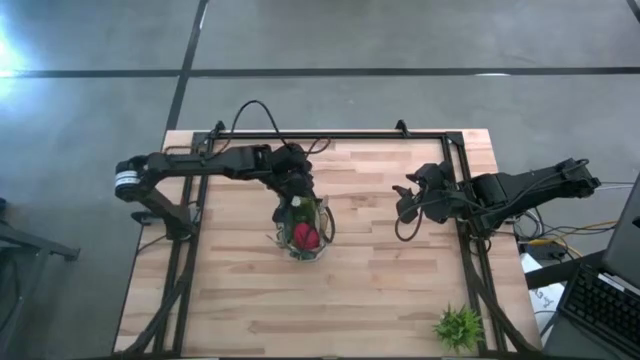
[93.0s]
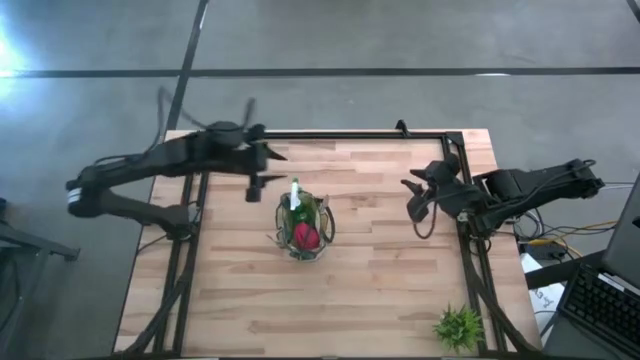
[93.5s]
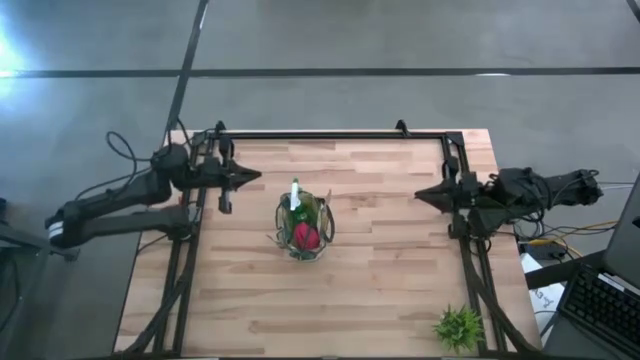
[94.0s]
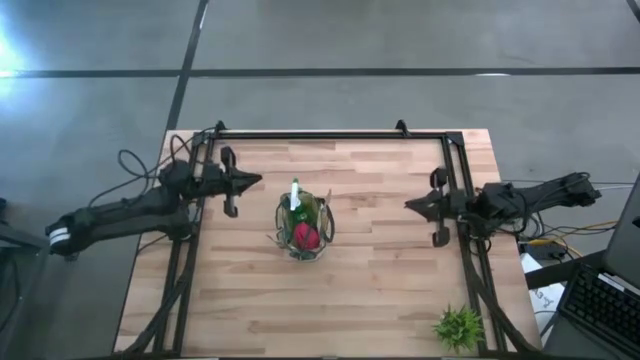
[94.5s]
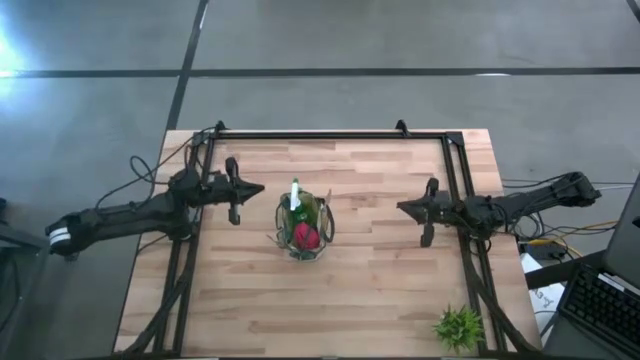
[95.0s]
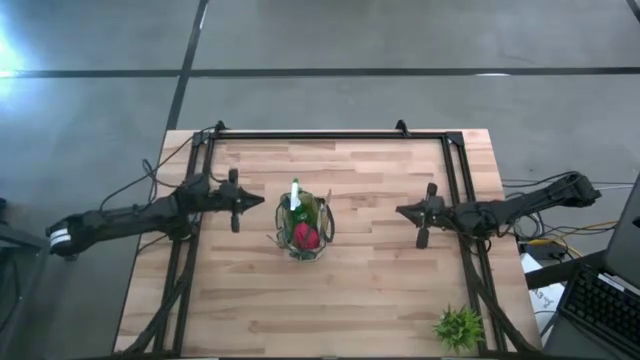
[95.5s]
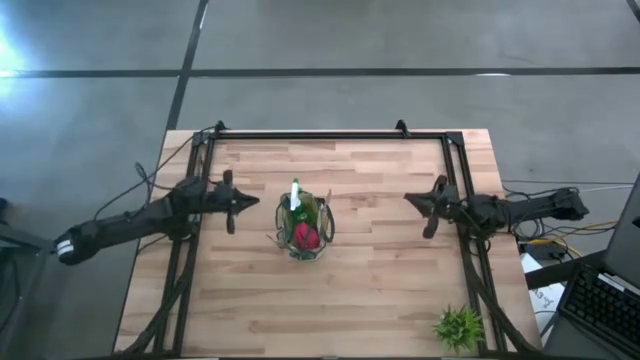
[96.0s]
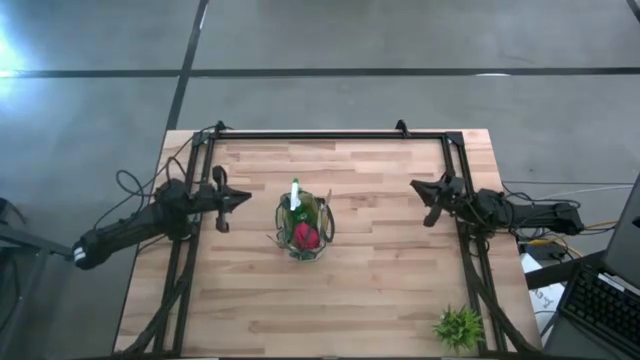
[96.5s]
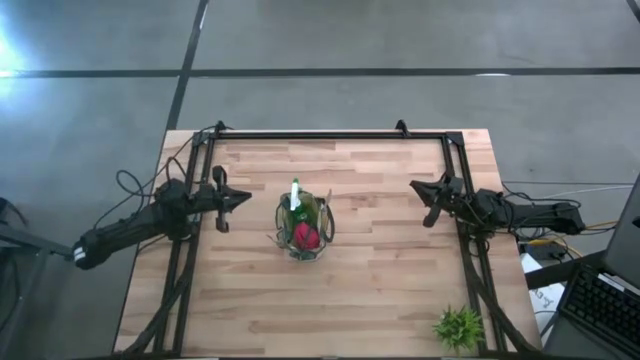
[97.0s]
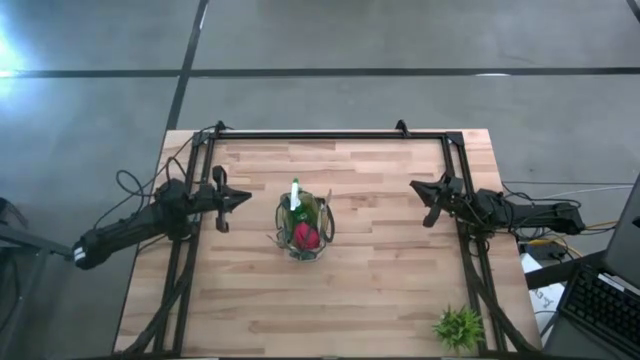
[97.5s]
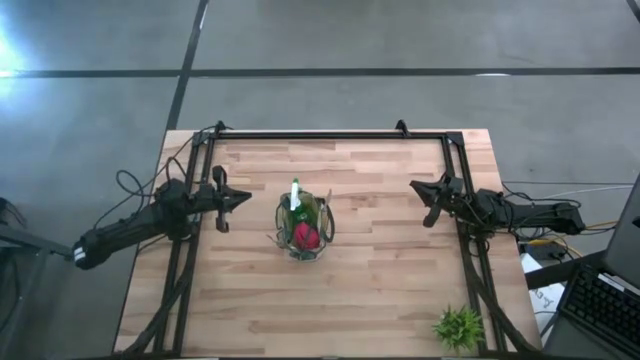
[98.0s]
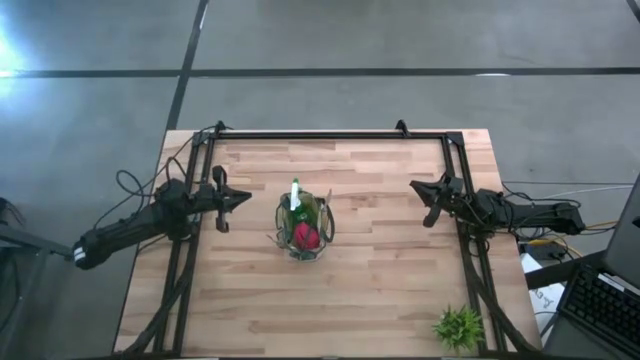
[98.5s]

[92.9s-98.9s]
Task: Pick & Place Garden tools in Gardening bag
Return to Home Position

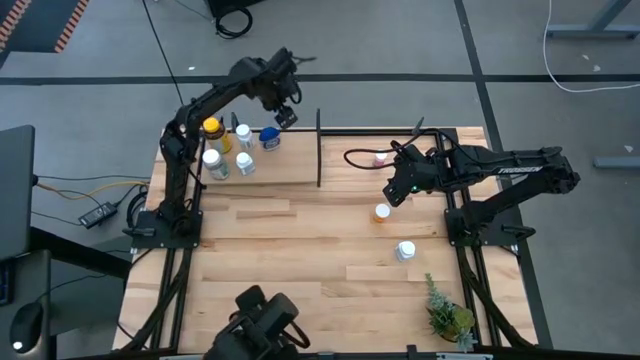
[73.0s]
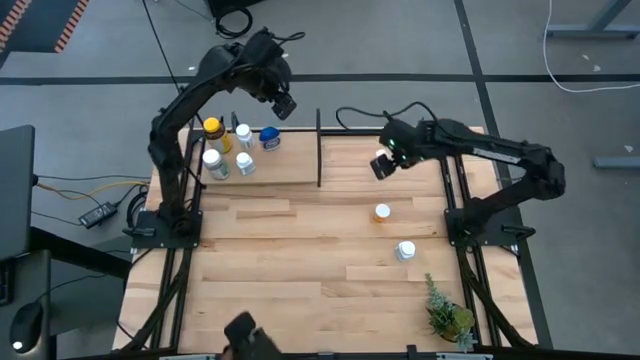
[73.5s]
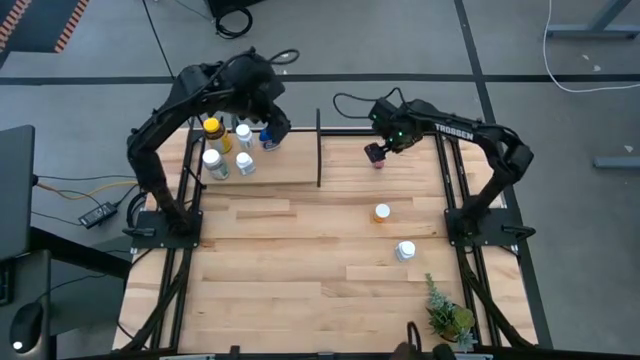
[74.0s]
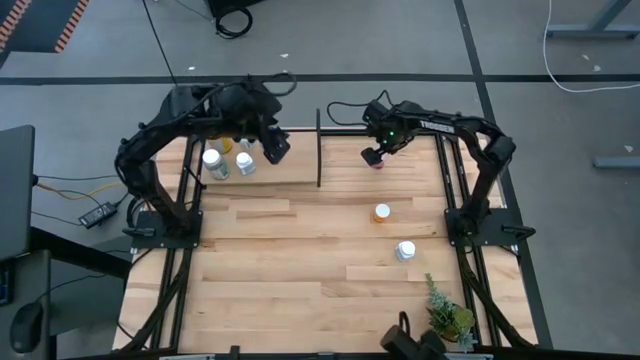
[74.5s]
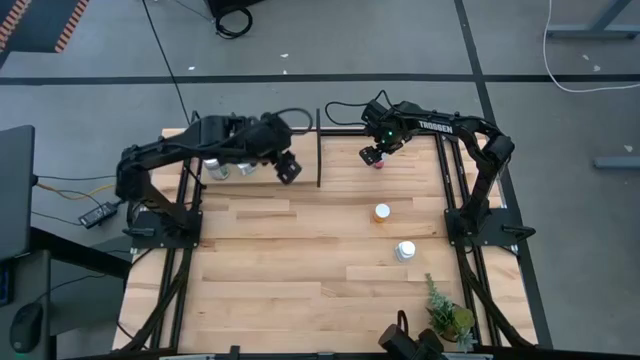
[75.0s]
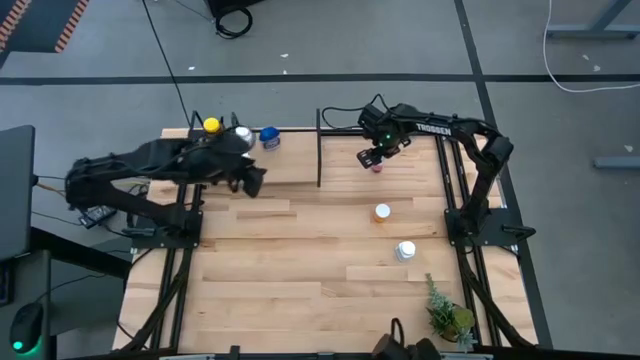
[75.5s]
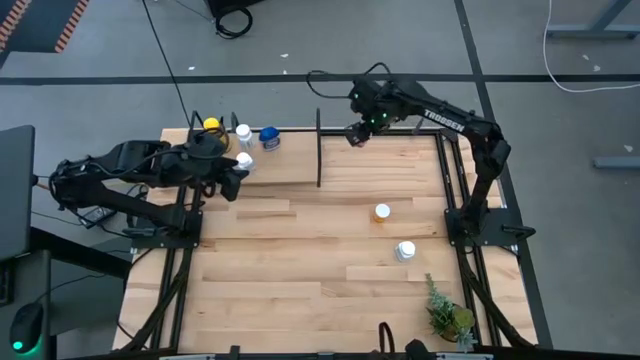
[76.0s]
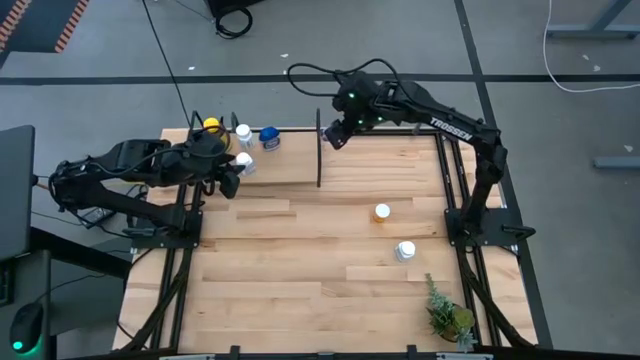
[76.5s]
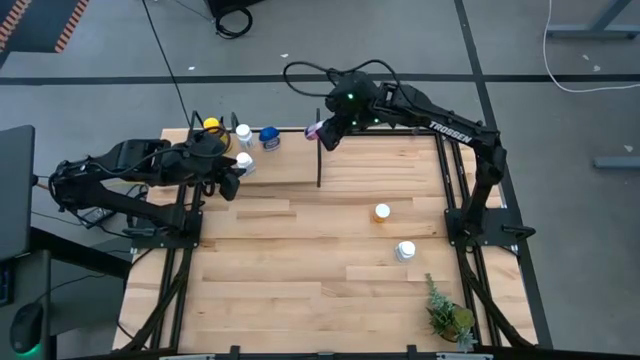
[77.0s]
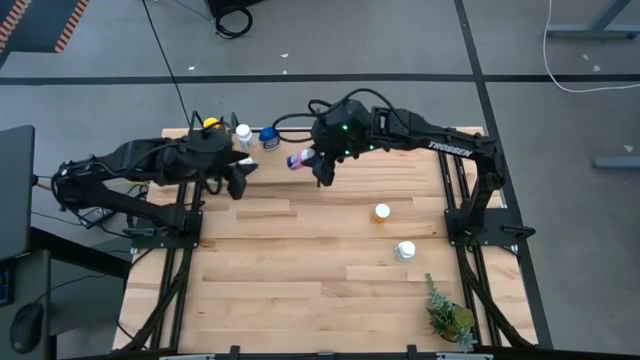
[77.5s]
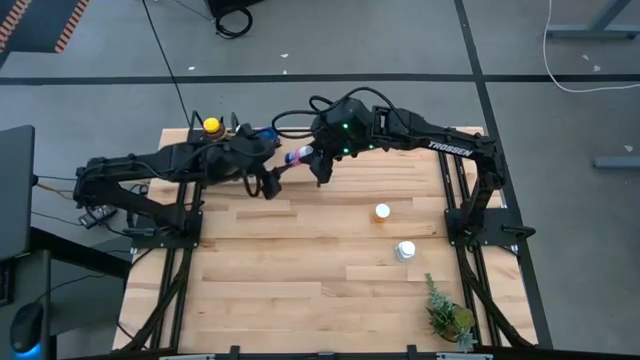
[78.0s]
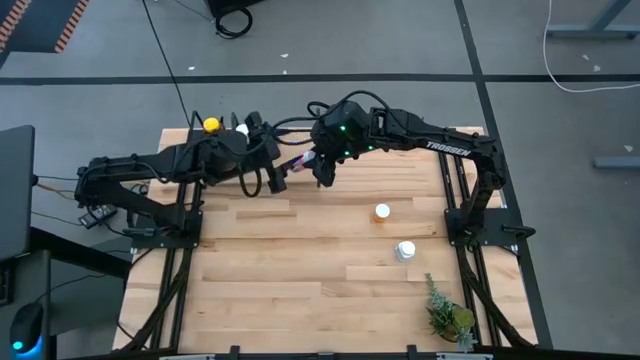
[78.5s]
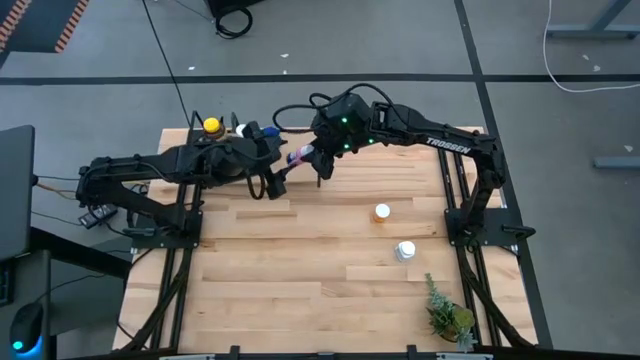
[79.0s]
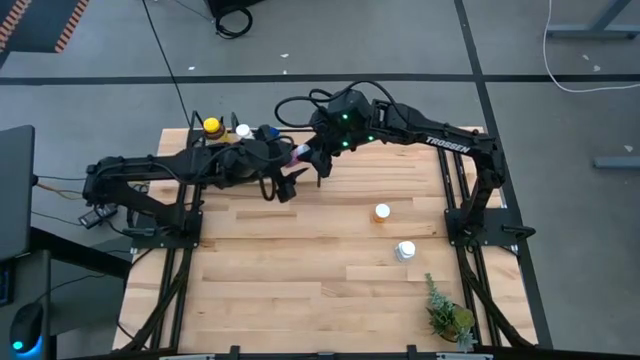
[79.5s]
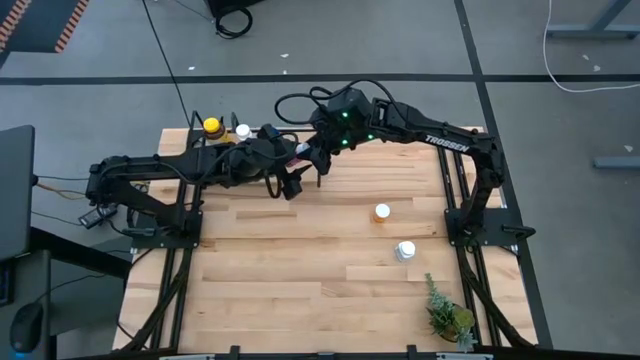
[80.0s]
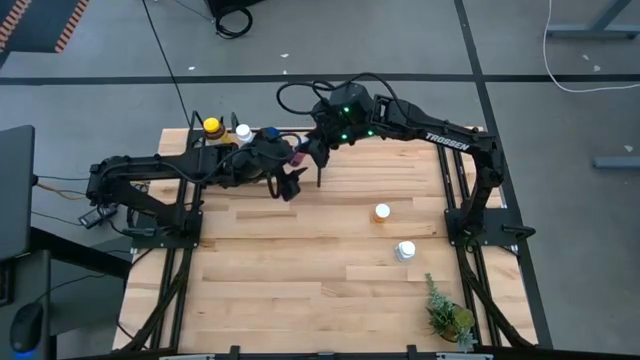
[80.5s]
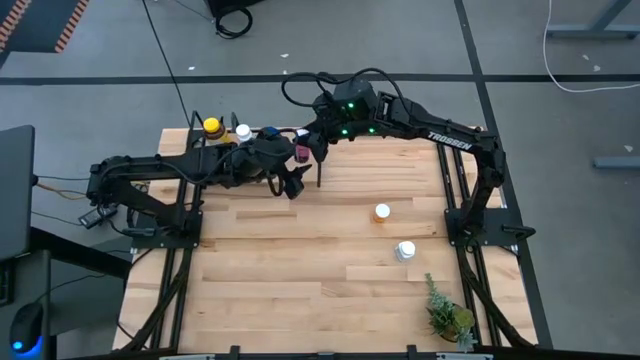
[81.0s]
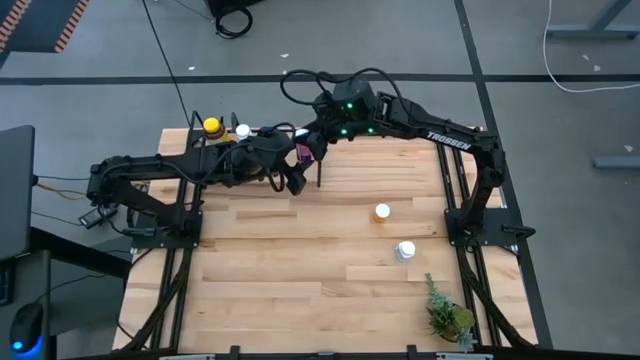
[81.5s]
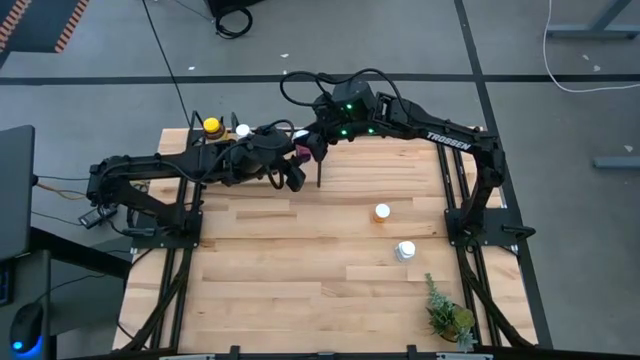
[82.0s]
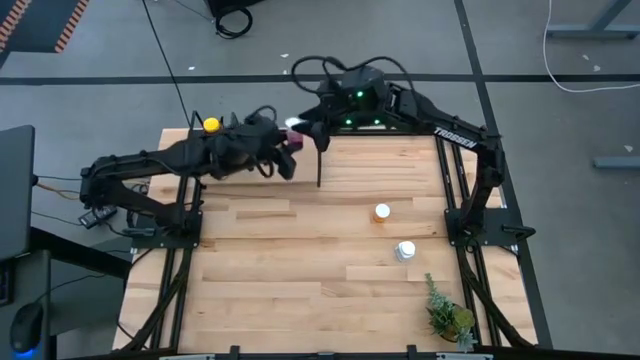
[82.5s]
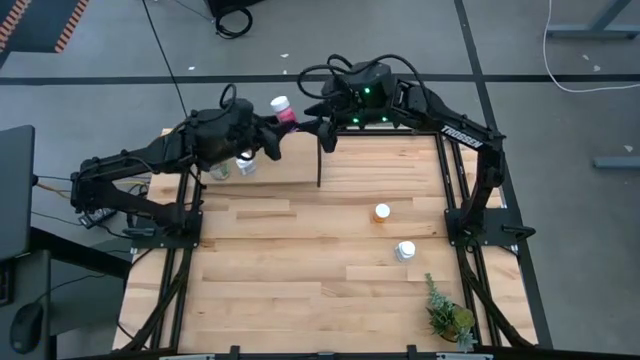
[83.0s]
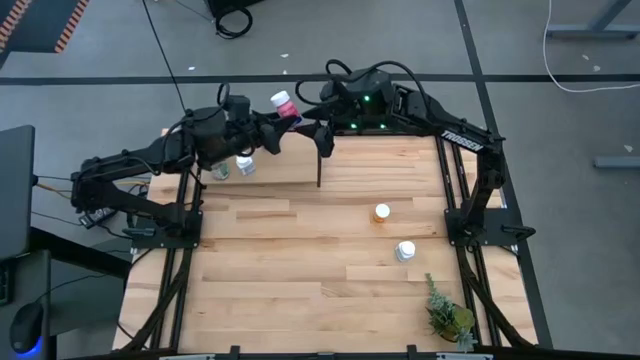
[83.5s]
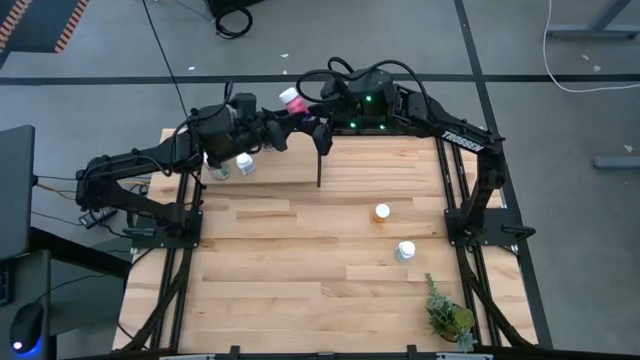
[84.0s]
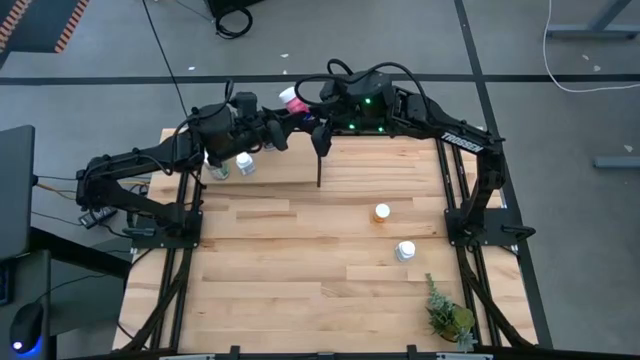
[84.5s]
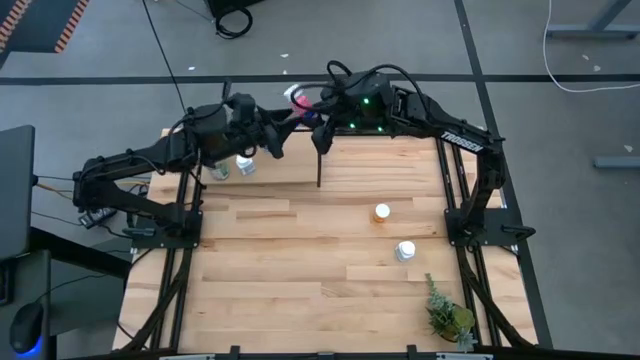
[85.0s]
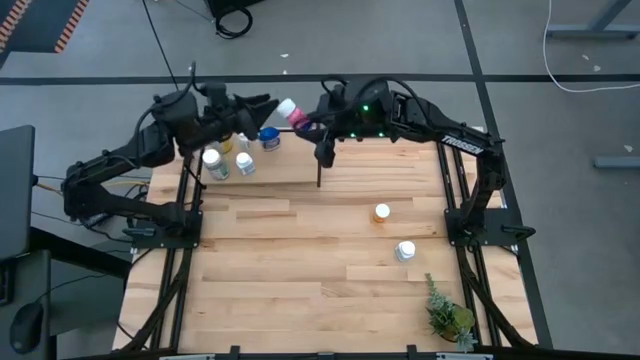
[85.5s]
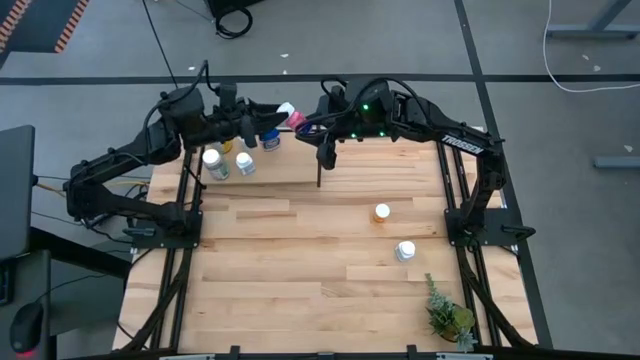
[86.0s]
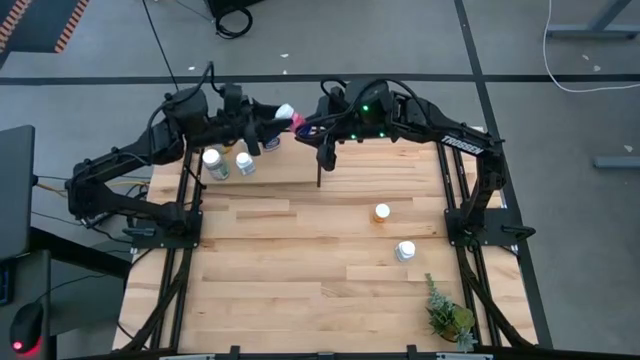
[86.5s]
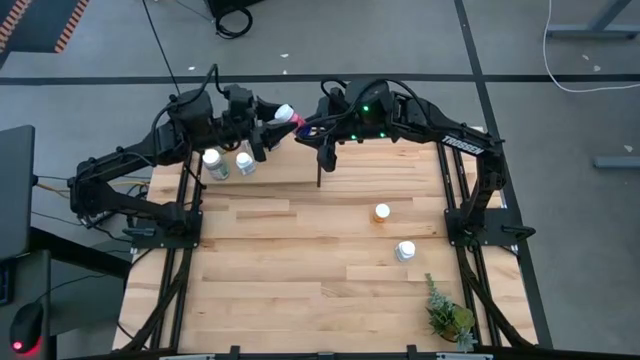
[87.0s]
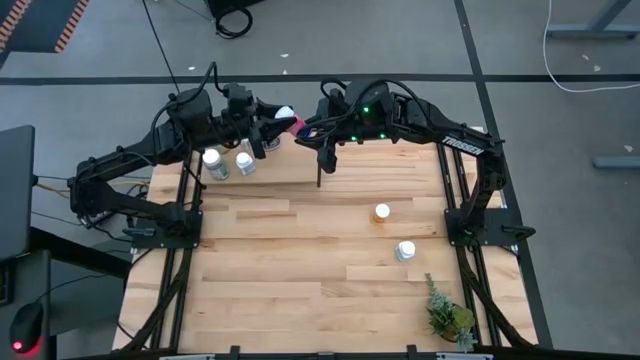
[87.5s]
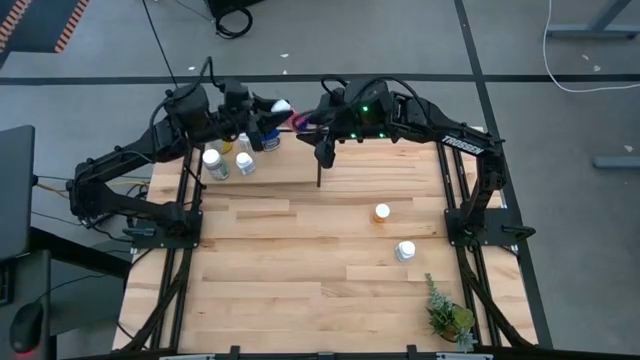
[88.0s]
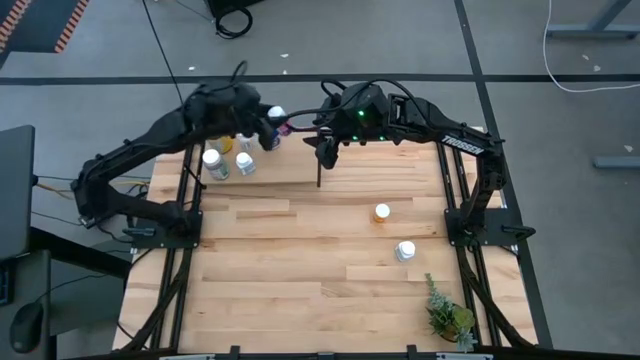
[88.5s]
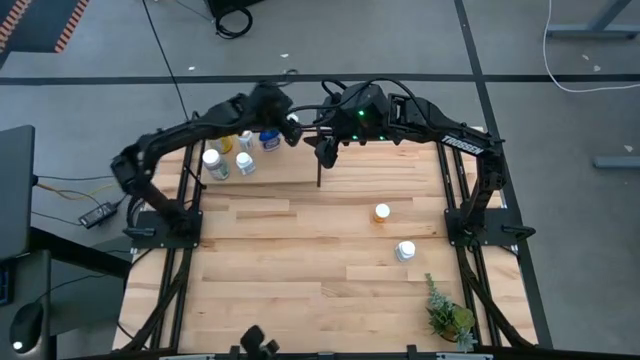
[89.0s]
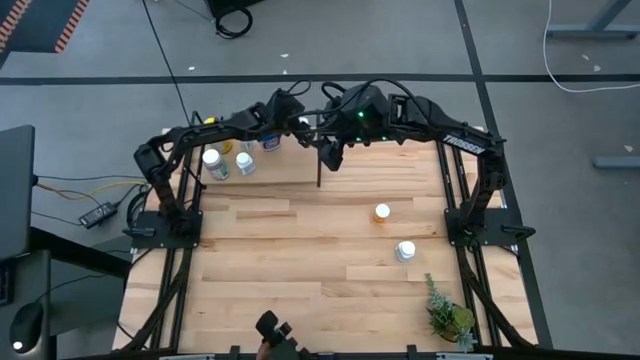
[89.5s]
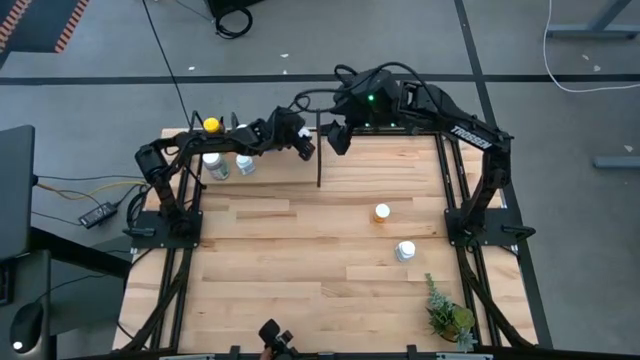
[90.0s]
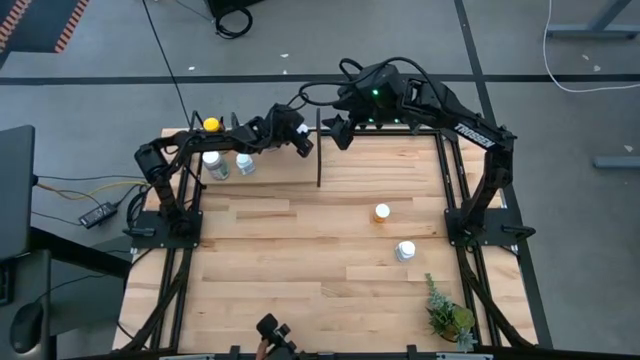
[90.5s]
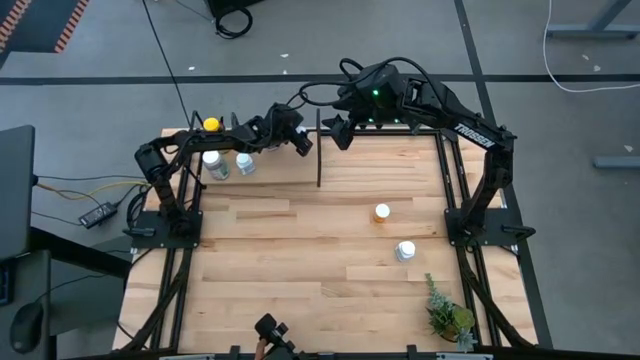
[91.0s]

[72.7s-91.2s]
Task: Pick and place medicine bottles onto shelf by color
Put the pink medicine bottle on the shelf
